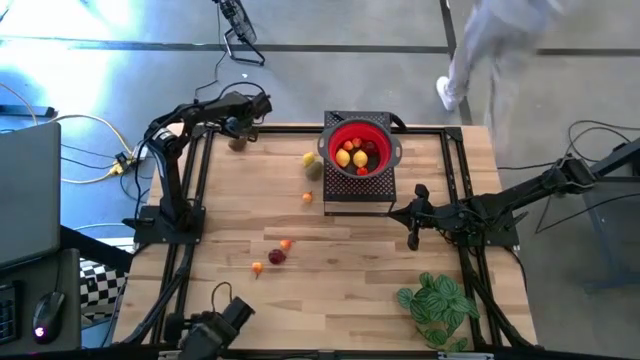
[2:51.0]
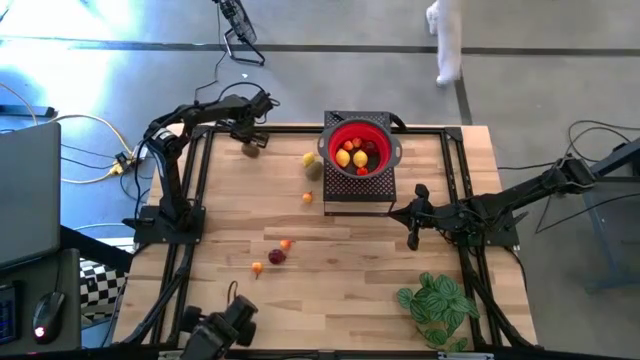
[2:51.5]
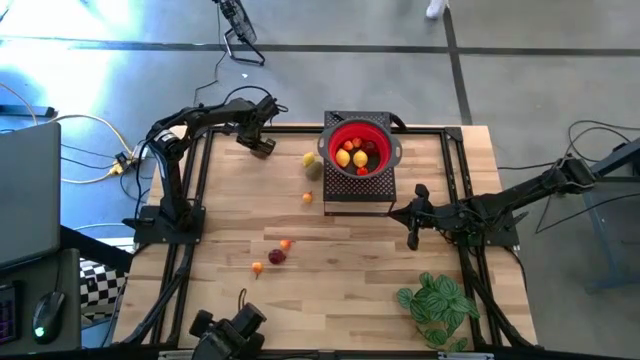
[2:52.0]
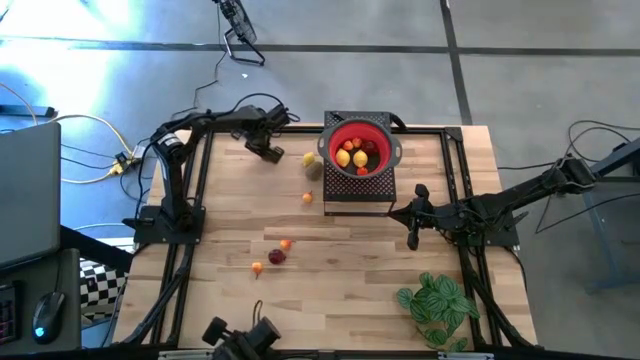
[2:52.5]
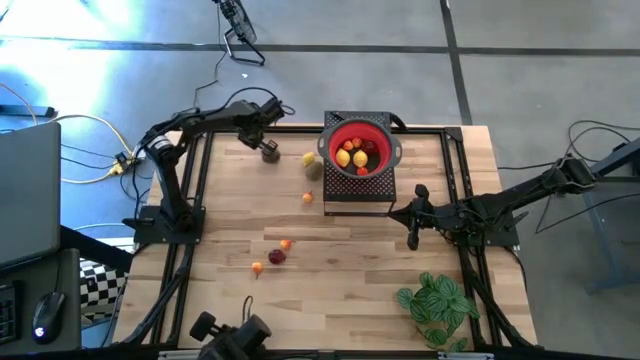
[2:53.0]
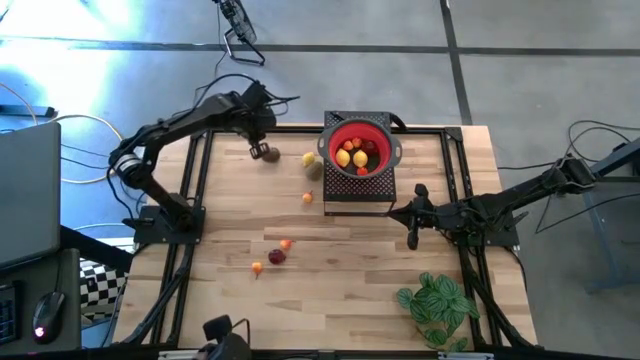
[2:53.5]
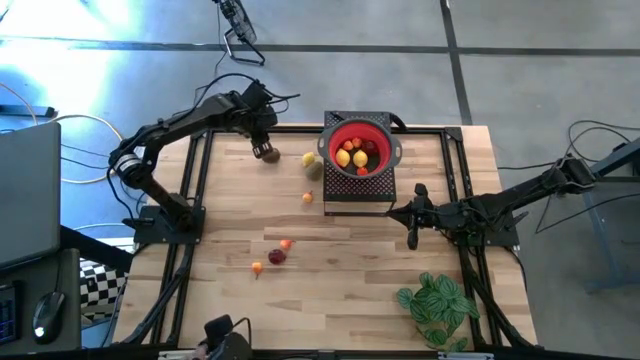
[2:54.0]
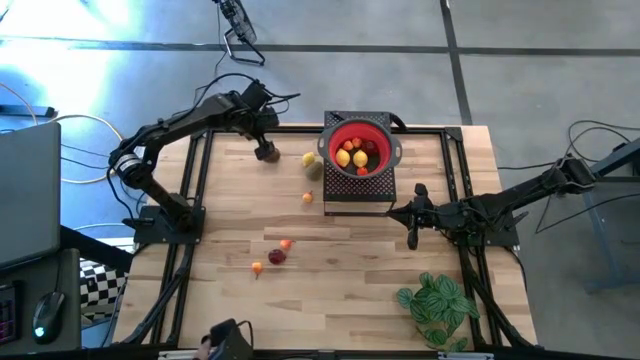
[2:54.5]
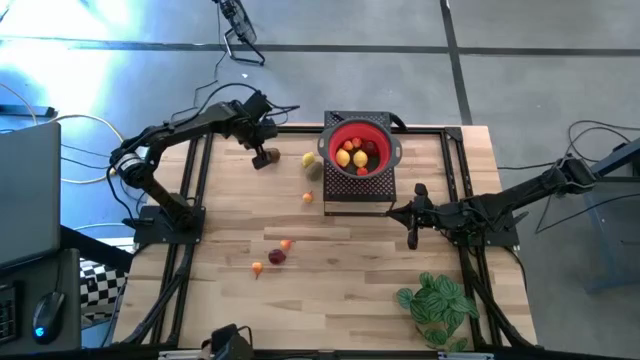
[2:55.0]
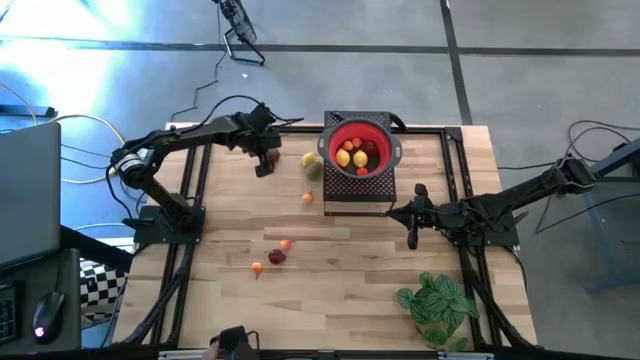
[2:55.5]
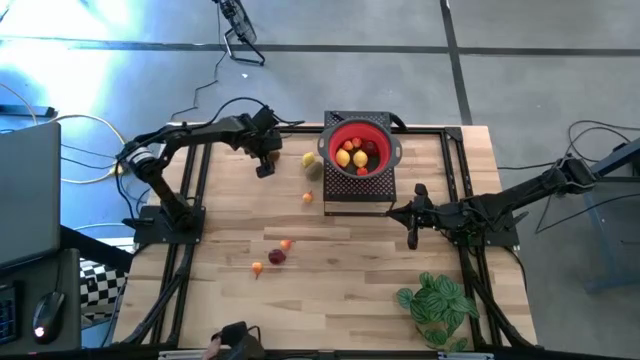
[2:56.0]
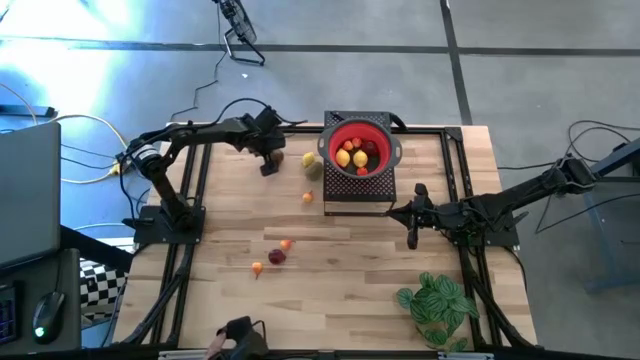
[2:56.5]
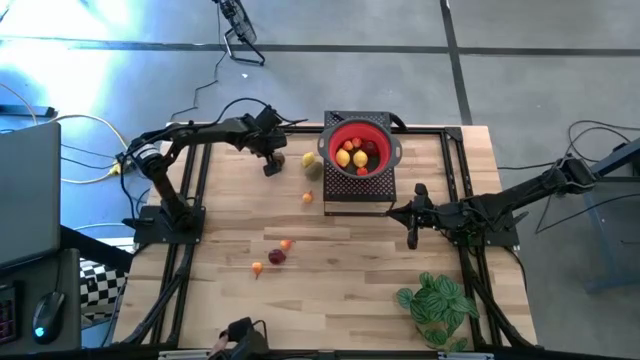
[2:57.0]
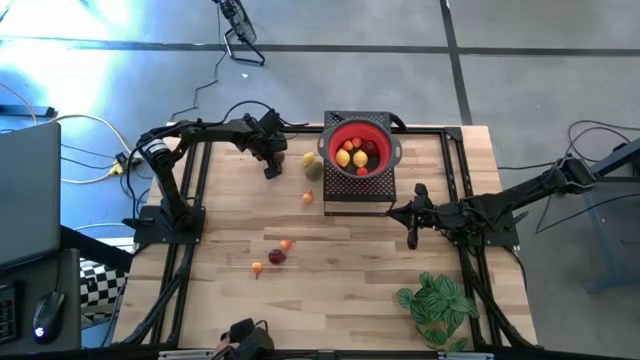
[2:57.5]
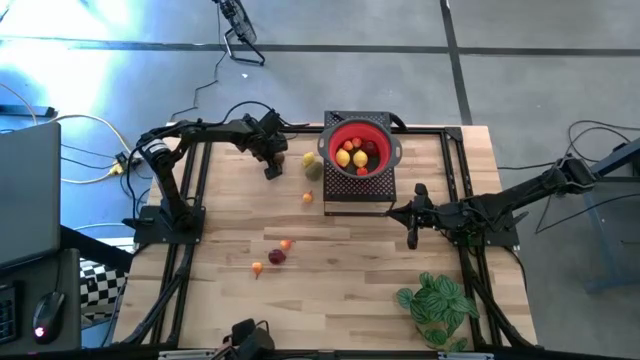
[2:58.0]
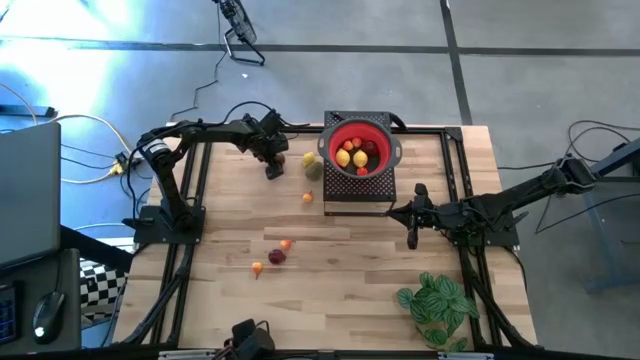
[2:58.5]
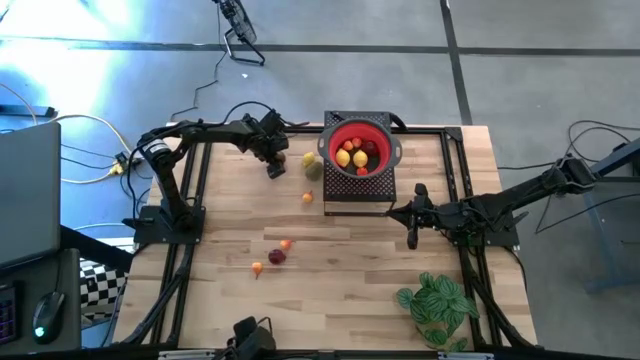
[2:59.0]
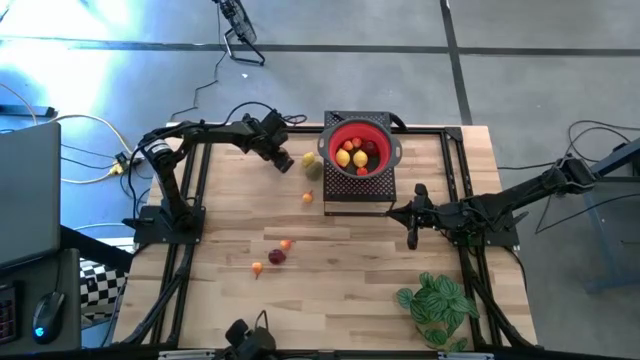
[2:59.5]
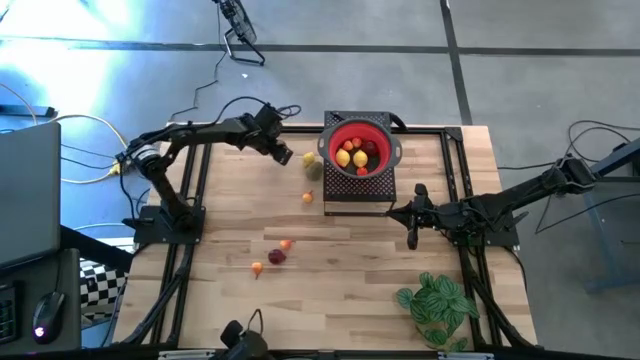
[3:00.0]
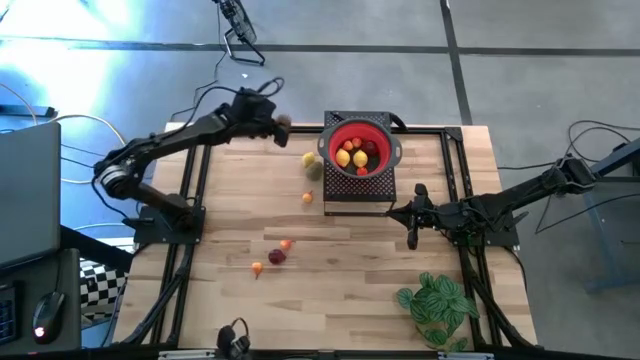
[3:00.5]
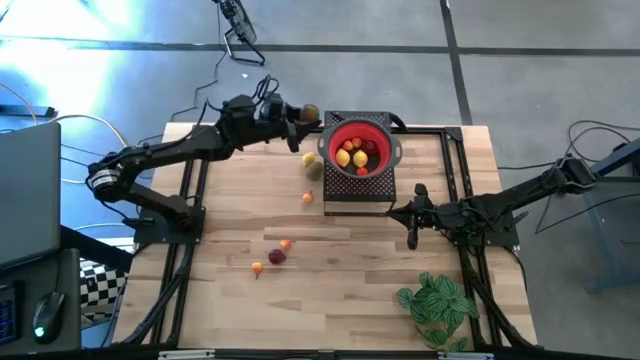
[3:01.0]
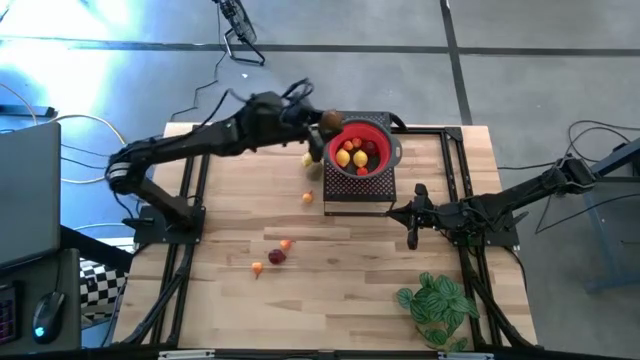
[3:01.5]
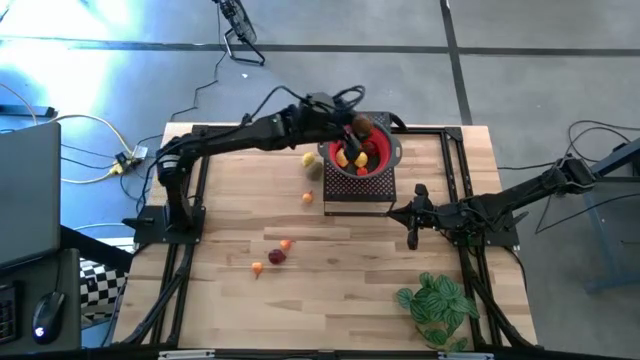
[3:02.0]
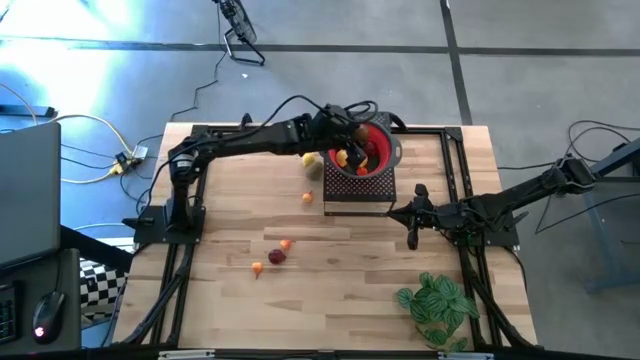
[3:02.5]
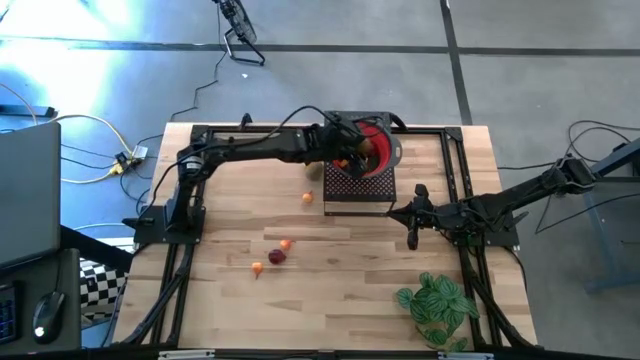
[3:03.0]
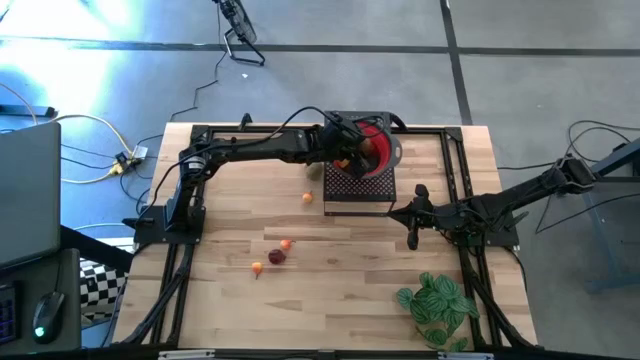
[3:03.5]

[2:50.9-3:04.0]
Task: Pick & Place Fruit
Put the left brown kiwi into the red strainer bowl on the shelf

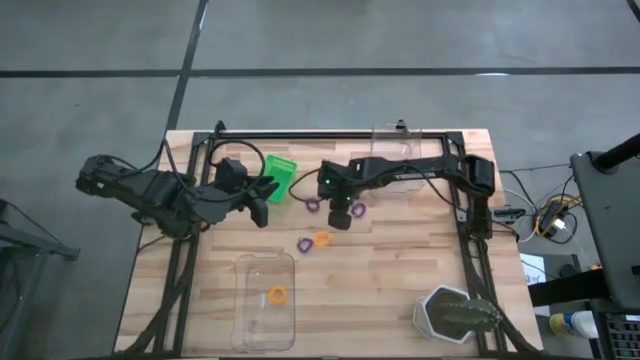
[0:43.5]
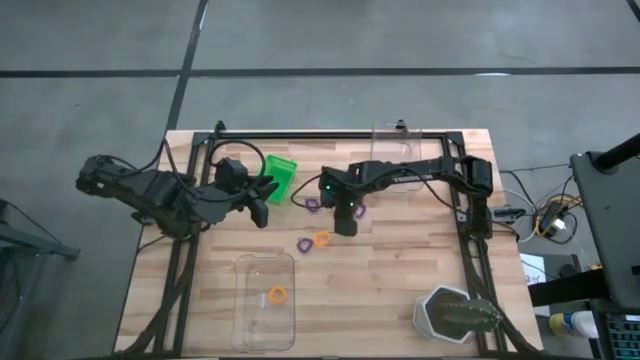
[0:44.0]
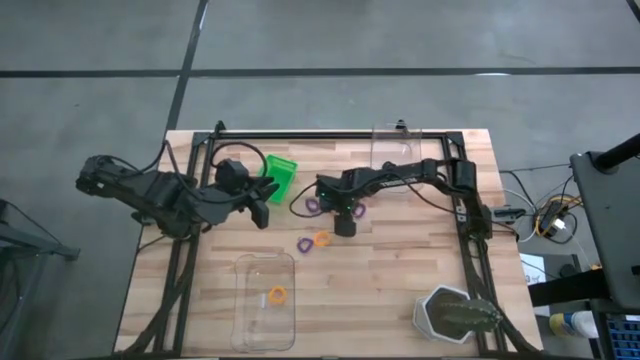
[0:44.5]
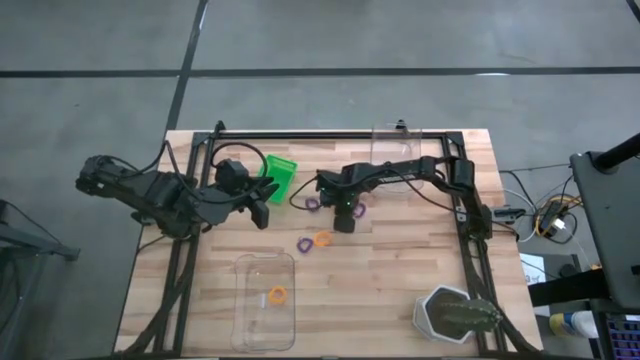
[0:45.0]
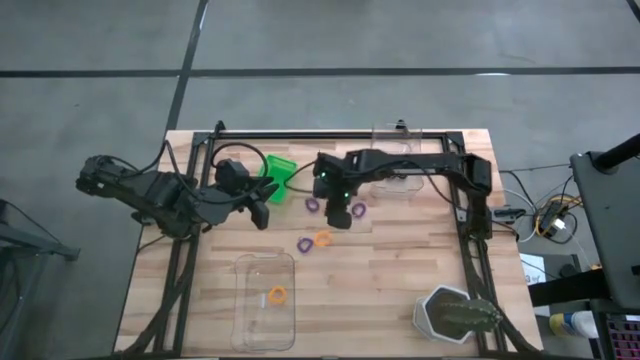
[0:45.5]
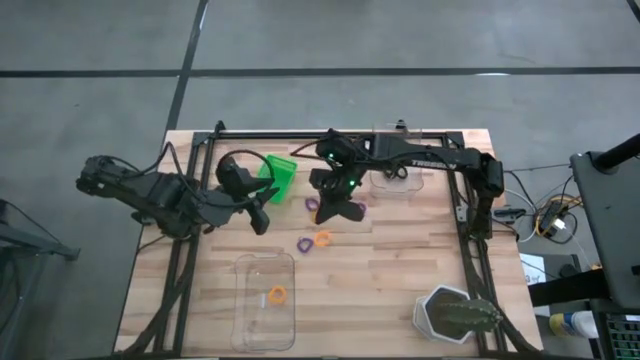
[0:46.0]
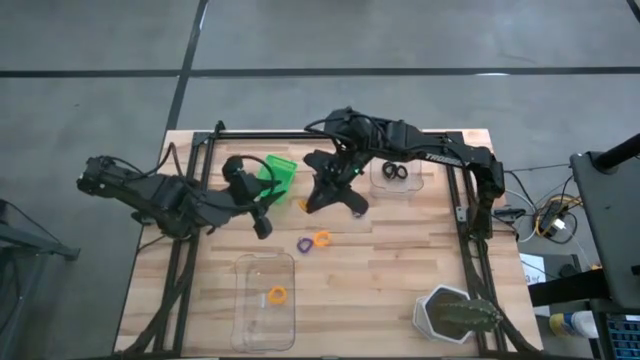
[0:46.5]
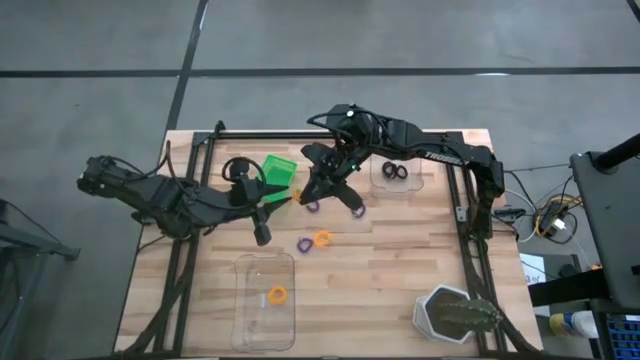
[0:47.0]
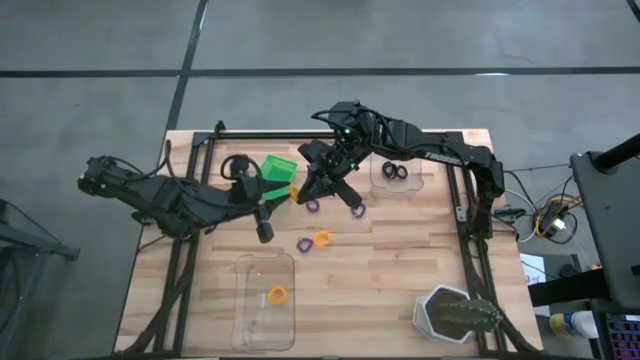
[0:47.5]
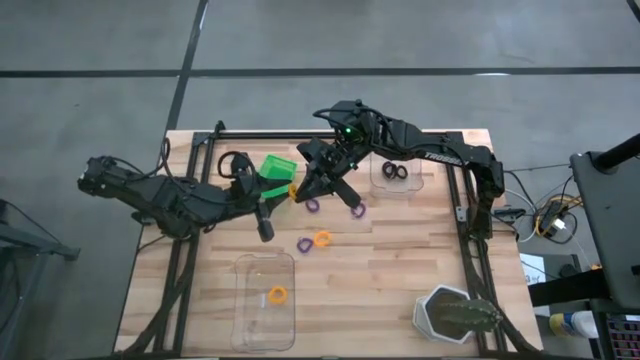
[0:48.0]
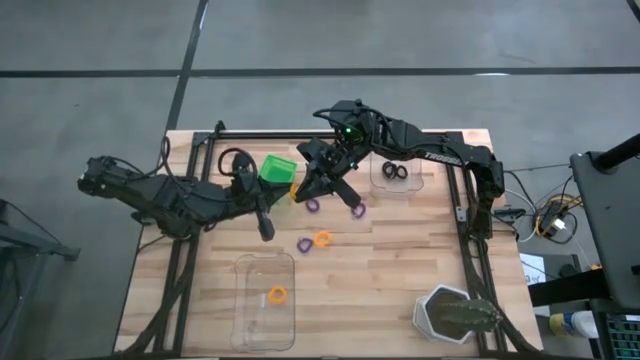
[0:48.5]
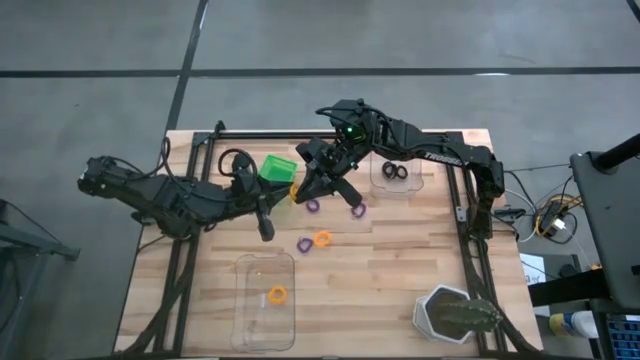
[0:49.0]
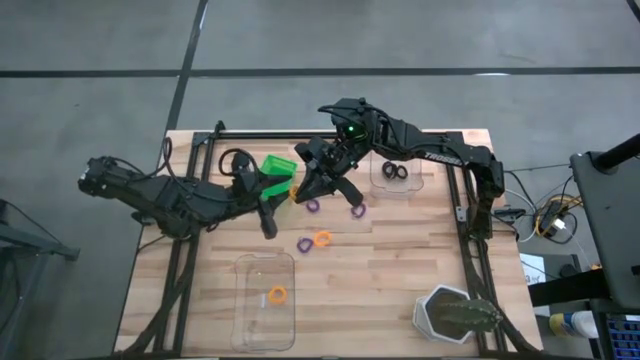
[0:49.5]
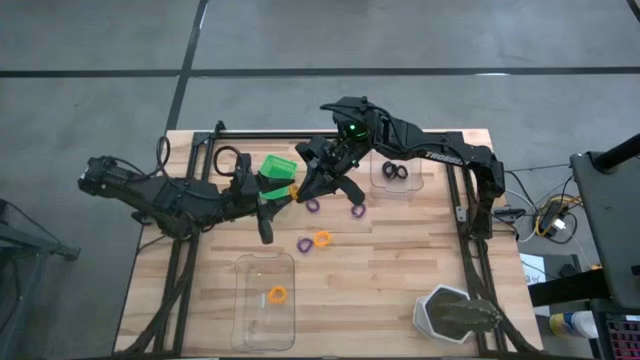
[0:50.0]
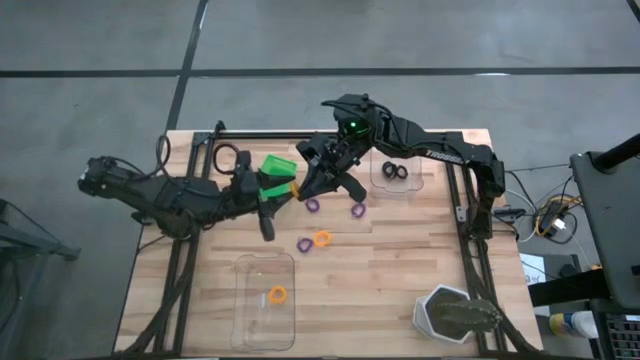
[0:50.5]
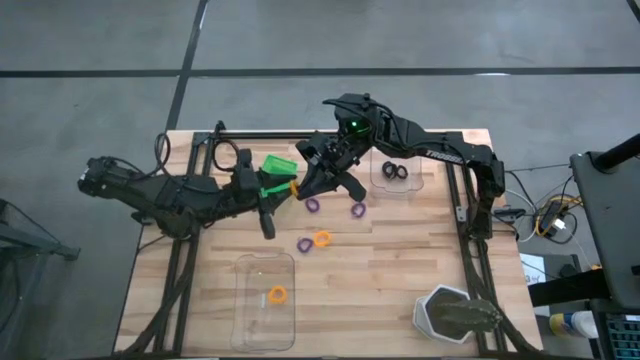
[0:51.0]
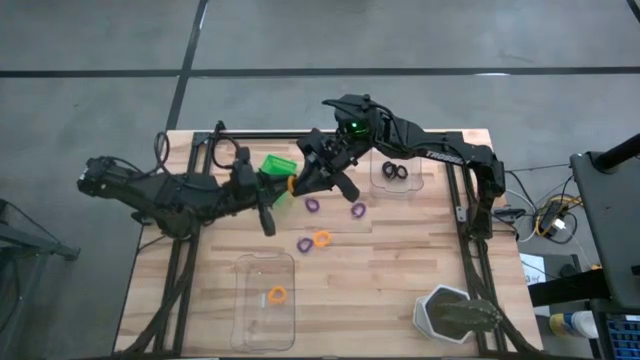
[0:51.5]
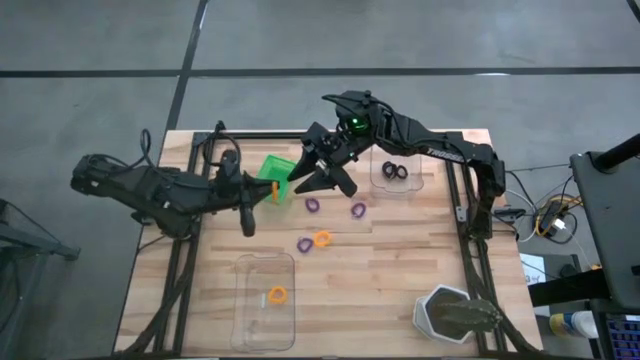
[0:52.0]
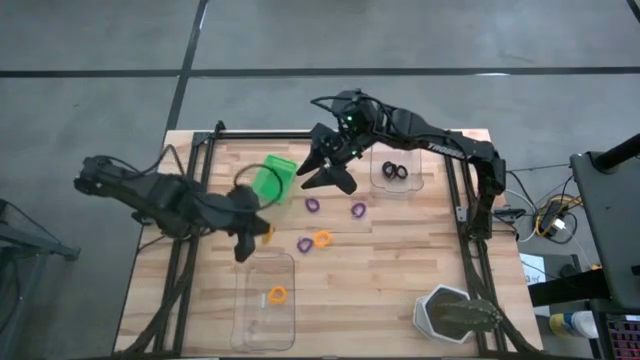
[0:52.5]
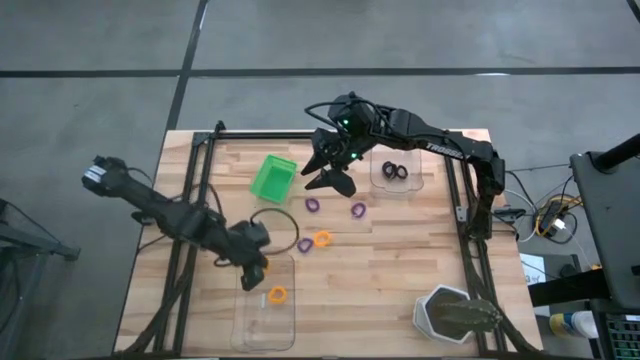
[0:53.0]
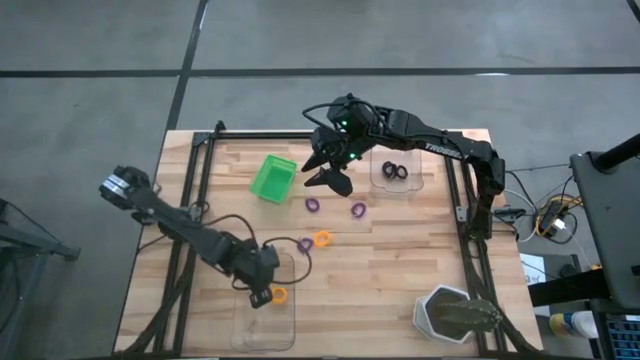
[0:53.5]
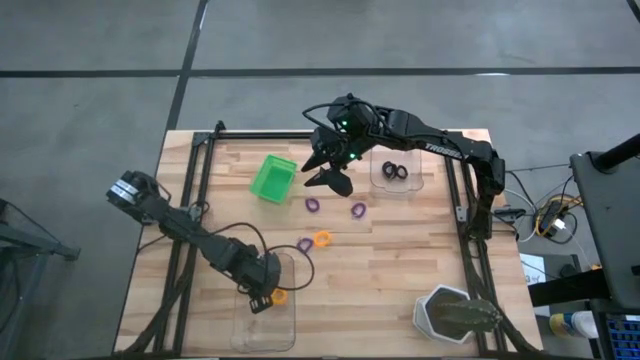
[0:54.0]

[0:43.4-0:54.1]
Task: Sort spring keychains
Put the top yellow spring keychain into the bottom transparent bin
